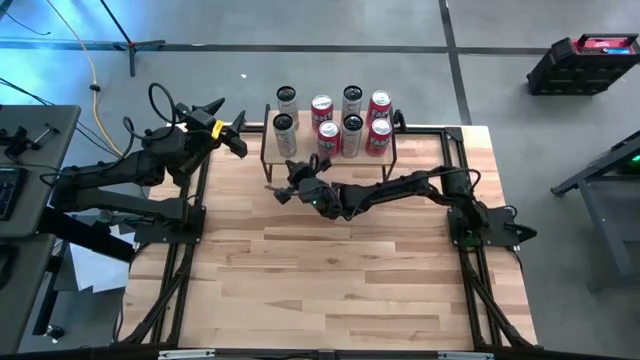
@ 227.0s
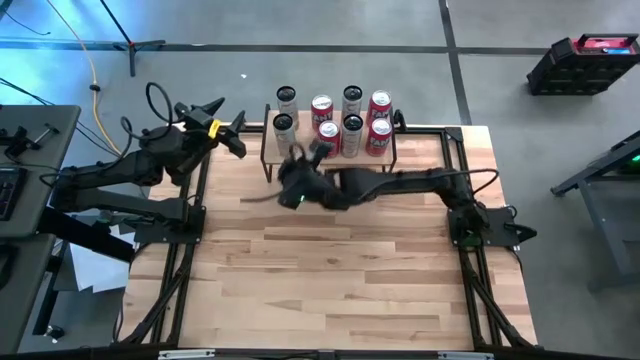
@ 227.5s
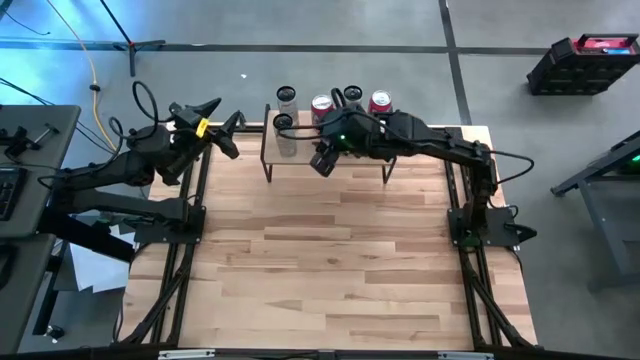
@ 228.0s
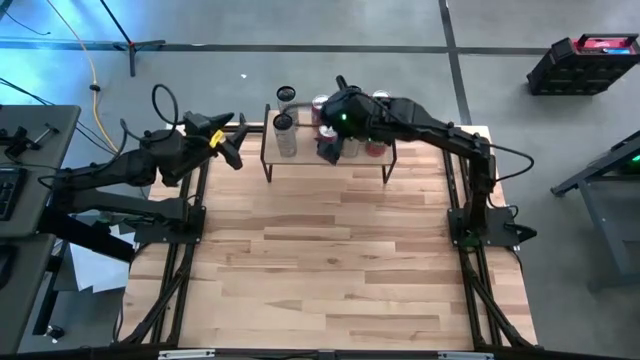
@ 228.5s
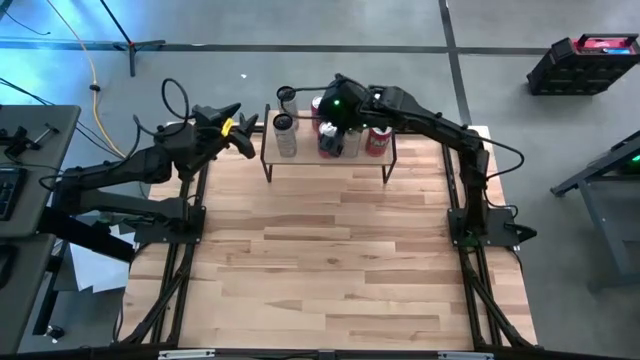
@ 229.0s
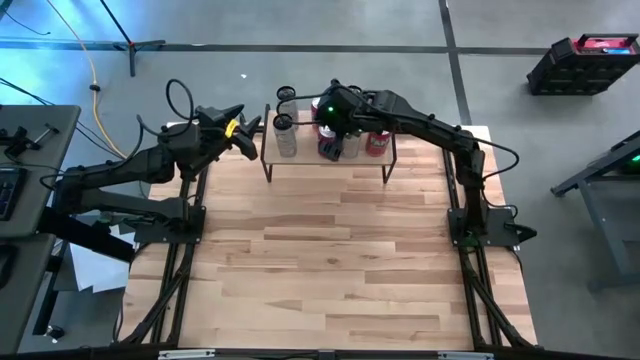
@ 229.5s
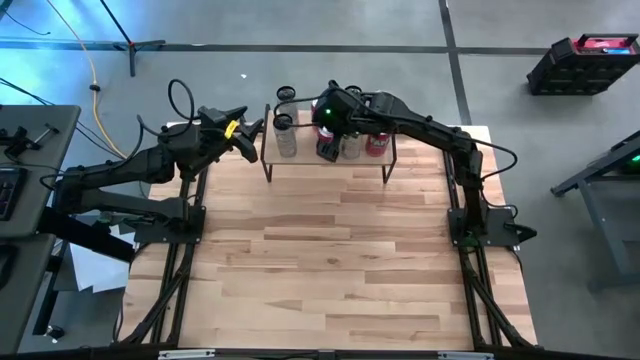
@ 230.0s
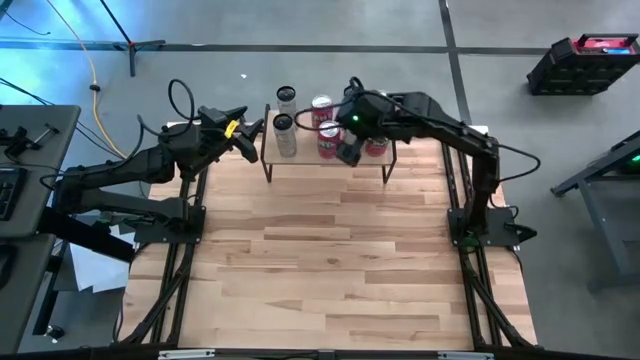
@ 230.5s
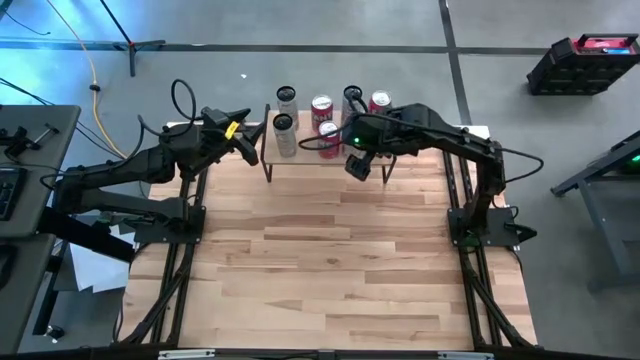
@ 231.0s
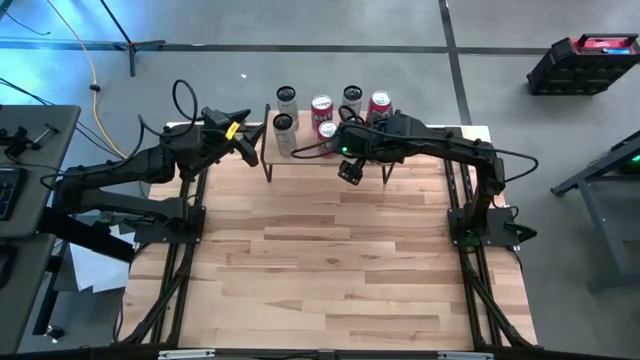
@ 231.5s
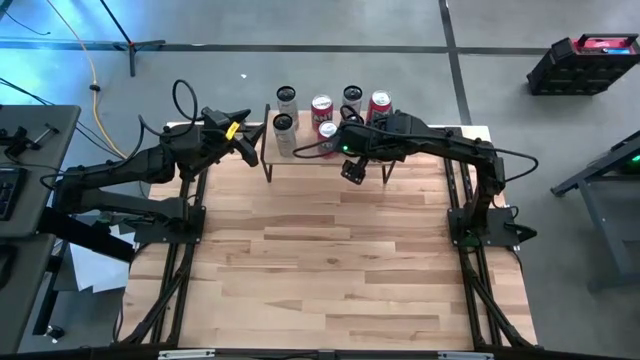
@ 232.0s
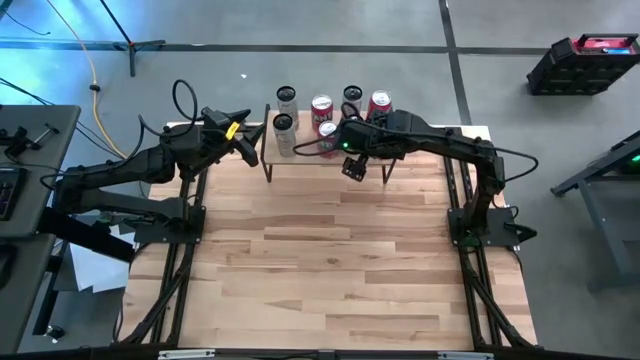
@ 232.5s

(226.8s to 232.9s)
Task: Place canned beverage on shelf
Adjust the bottom right white soda can on the shelf

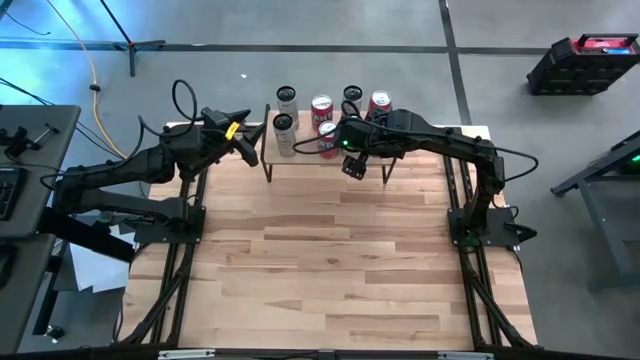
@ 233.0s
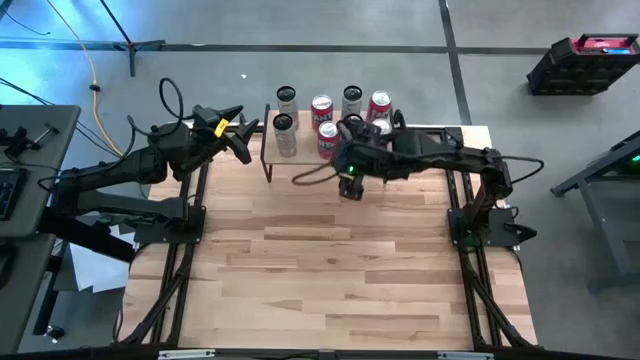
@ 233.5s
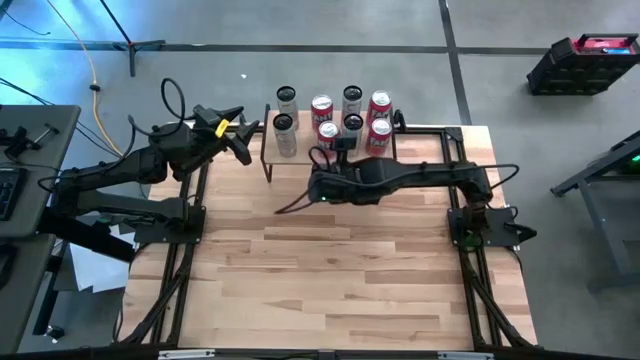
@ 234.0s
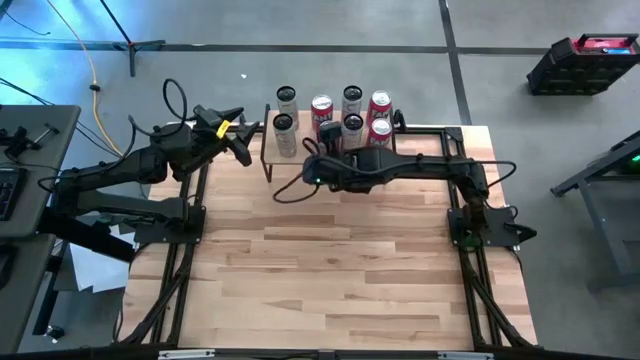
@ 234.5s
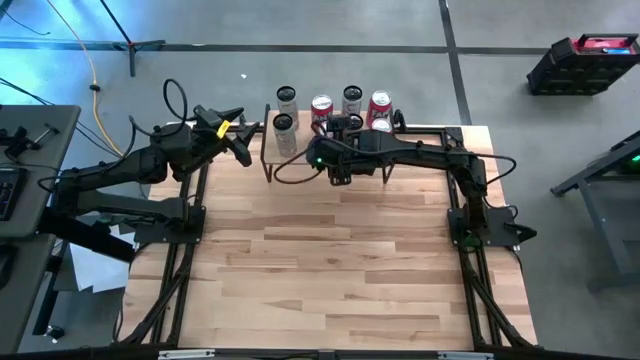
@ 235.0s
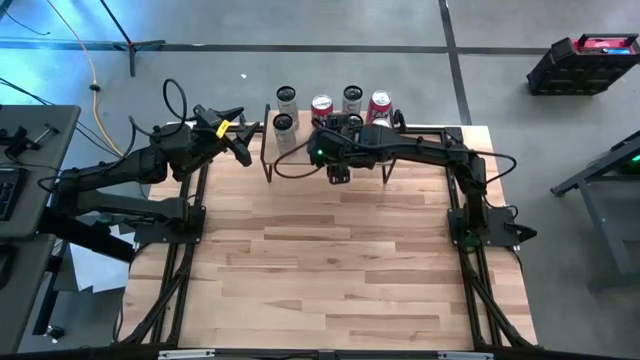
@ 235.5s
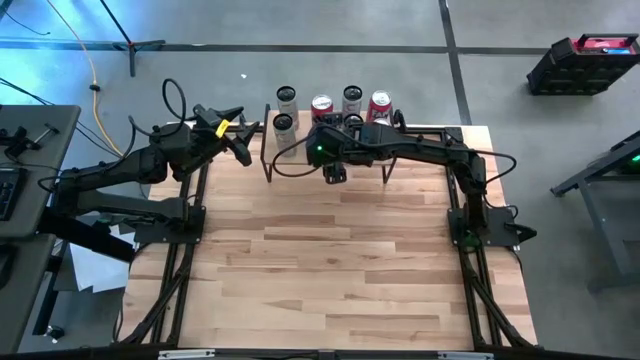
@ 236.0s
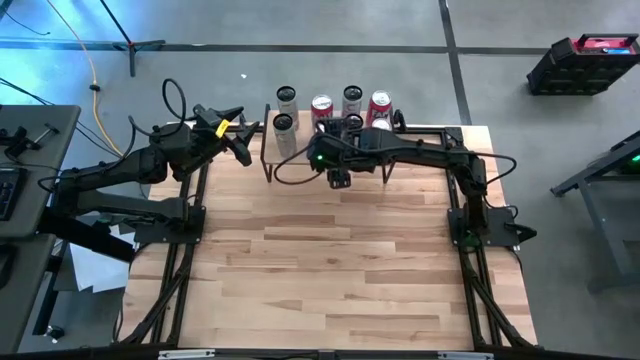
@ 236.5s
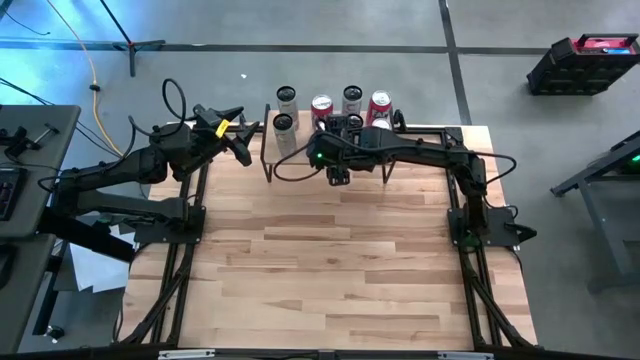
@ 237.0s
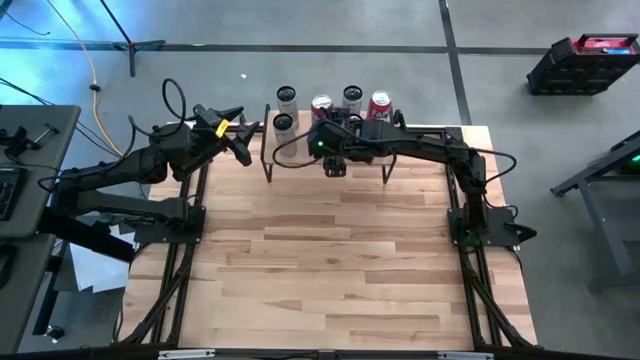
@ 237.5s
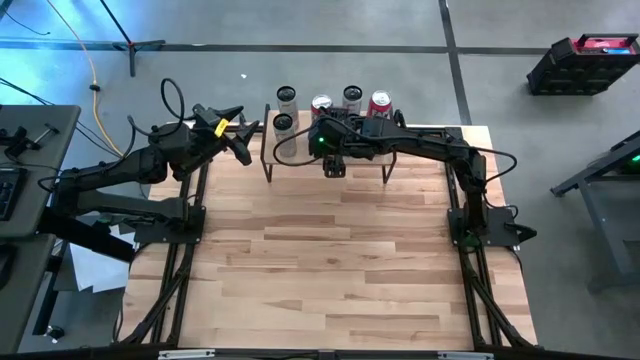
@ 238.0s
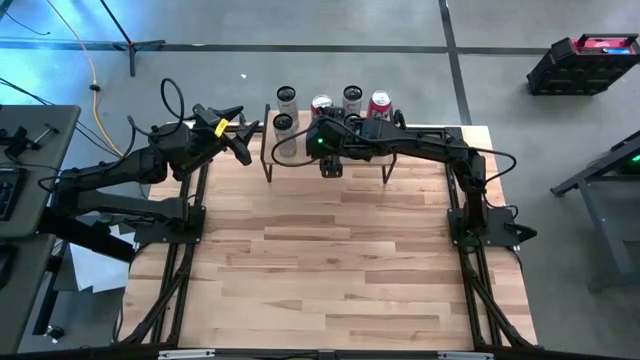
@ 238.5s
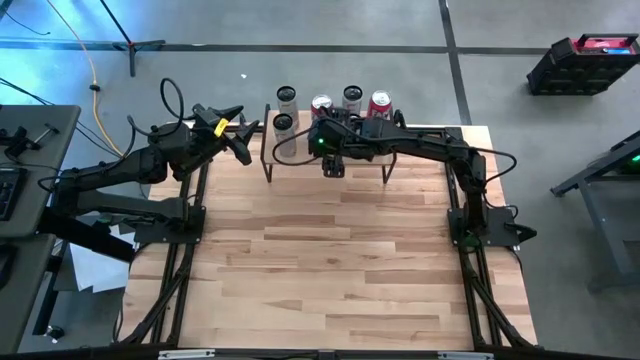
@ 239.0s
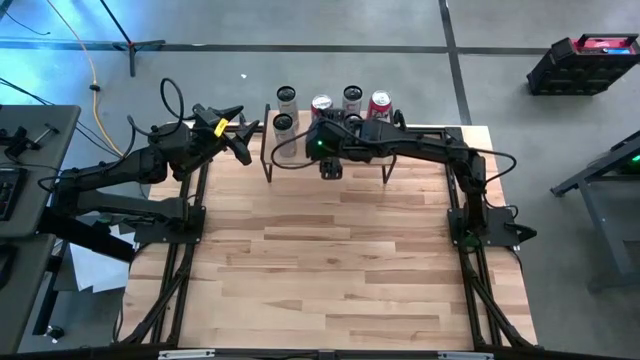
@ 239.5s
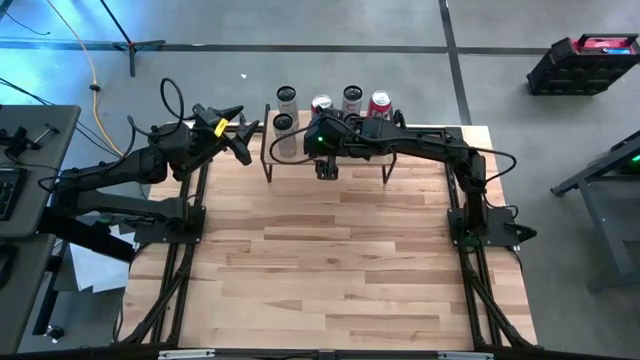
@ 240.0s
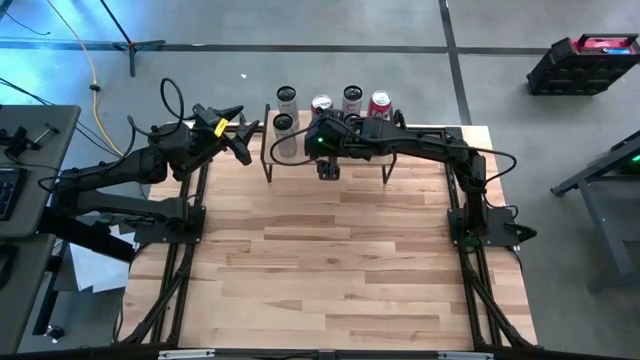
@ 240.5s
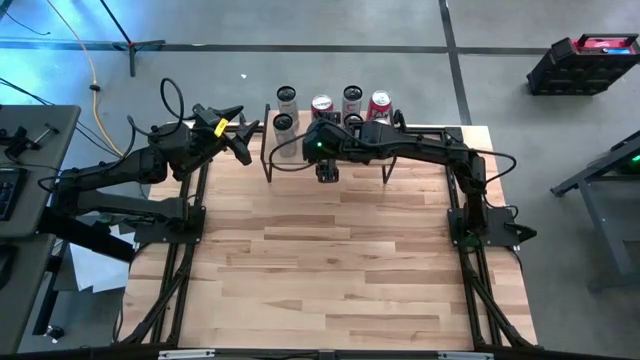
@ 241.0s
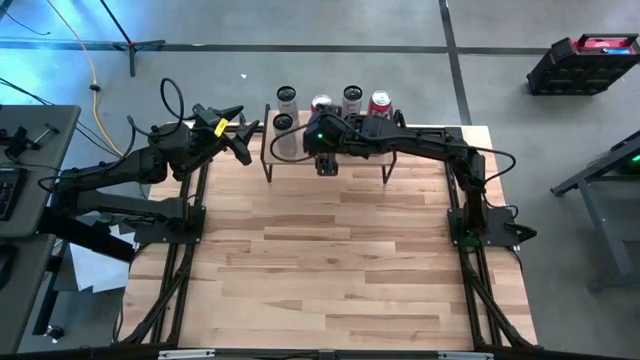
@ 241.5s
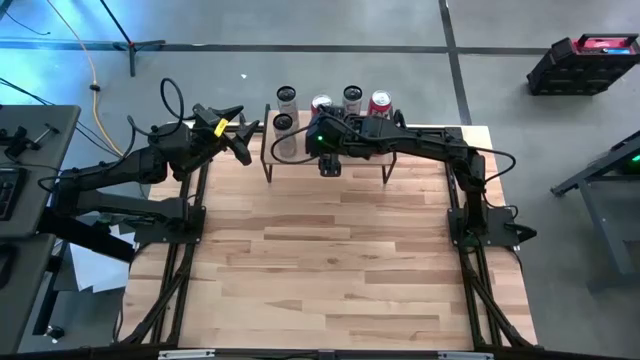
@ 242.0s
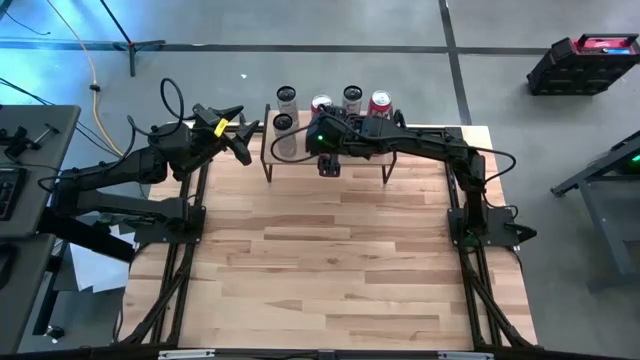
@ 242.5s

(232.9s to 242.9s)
Adjust the bottom left red soda can on the shelf

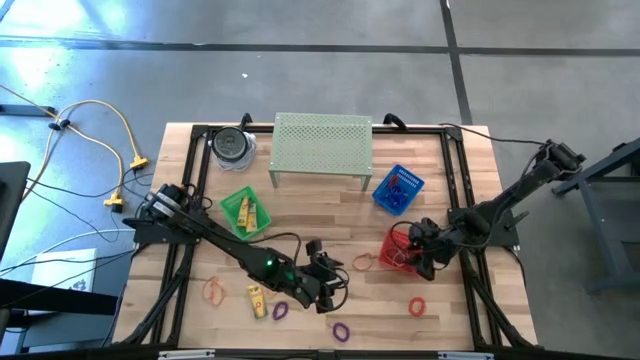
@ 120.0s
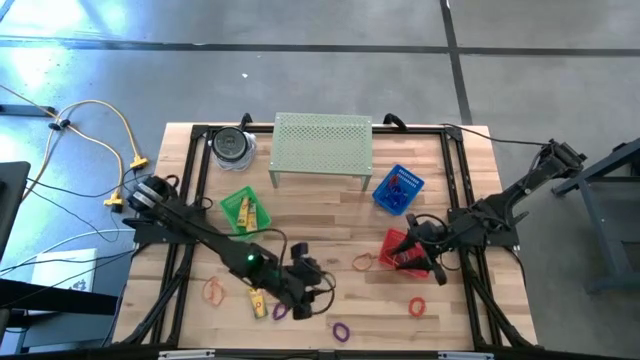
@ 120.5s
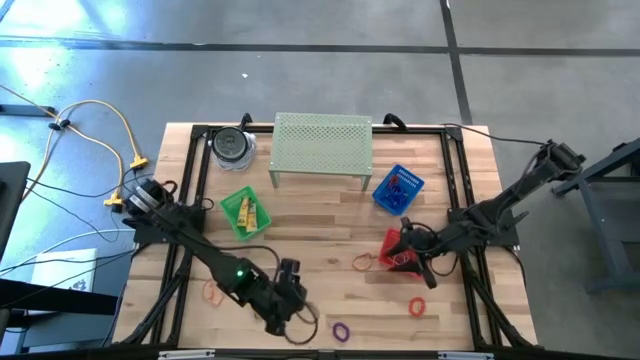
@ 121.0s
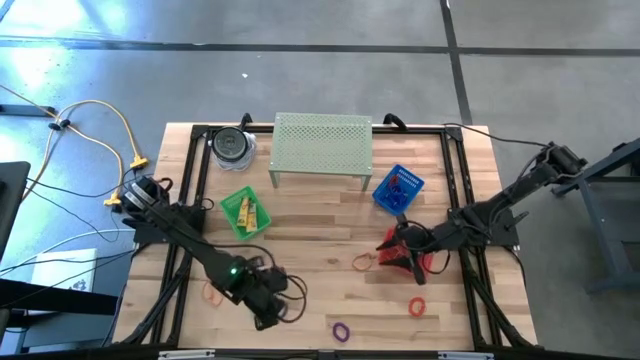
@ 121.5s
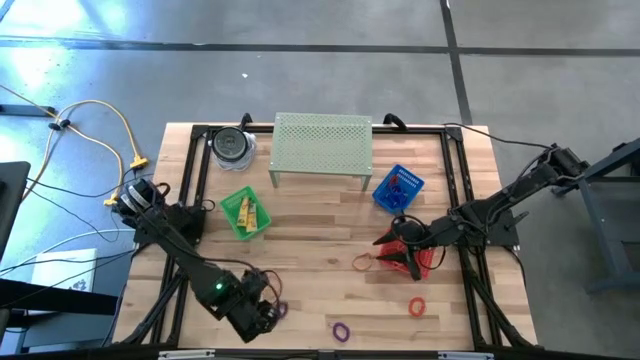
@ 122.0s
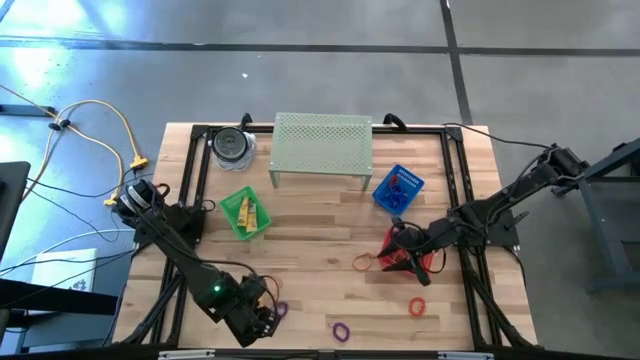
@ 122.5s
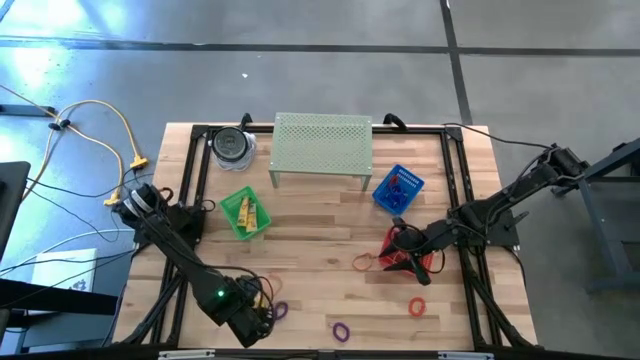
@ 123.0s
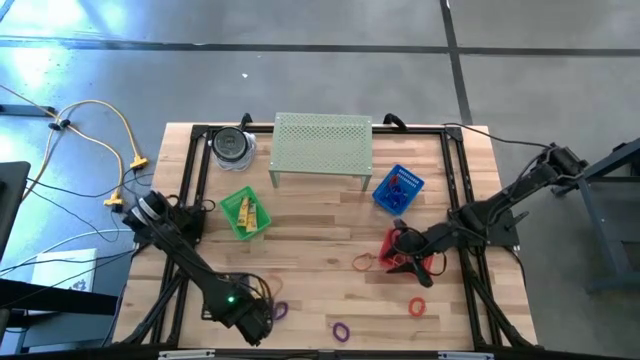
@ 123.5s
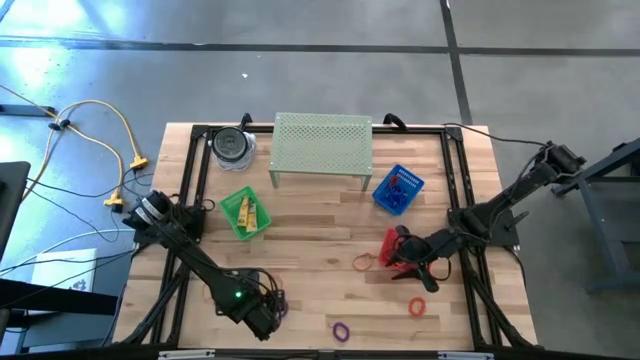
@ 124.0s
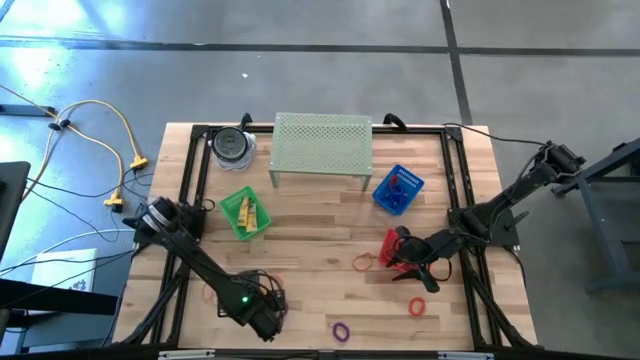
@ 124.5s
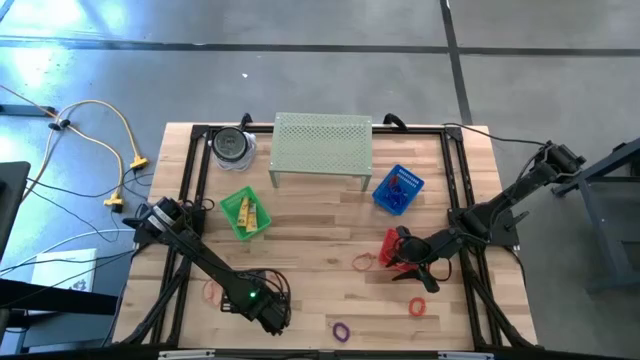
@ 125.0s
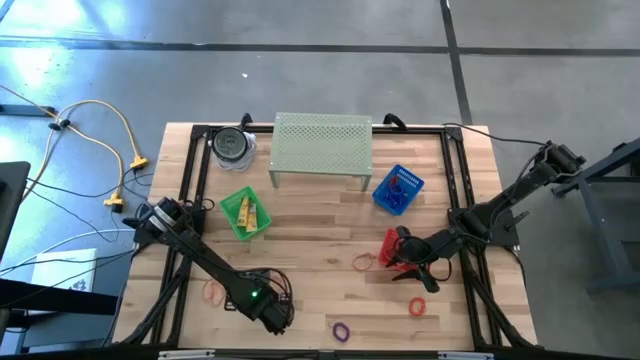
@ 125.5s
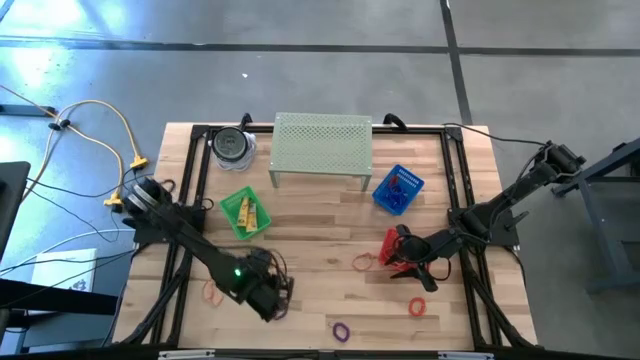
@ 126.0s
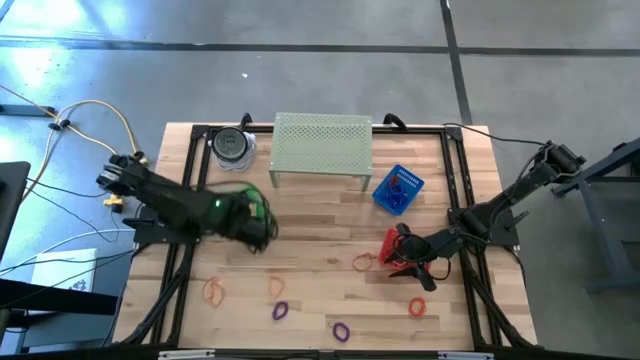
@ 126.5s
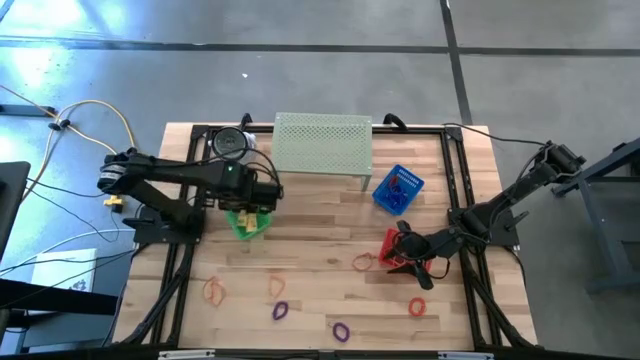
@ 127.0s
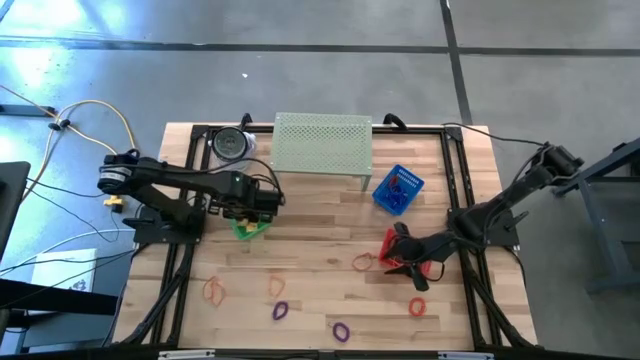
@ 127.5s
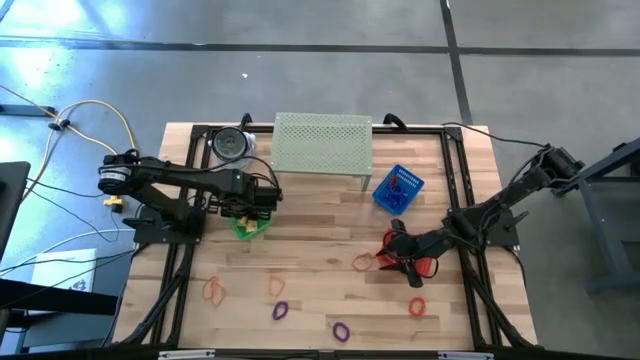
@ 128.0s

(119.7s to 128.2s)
Task: Pick & Place Office Desk Supplies
Put the box of crayon into the green basket
